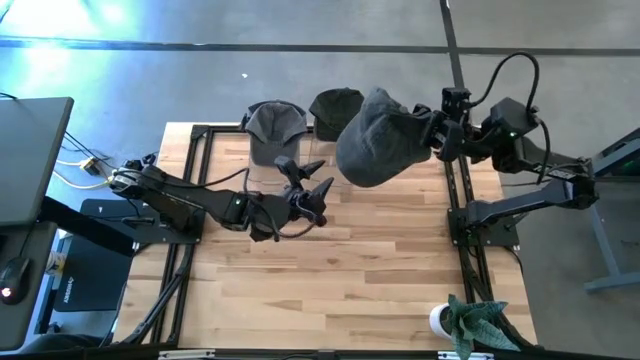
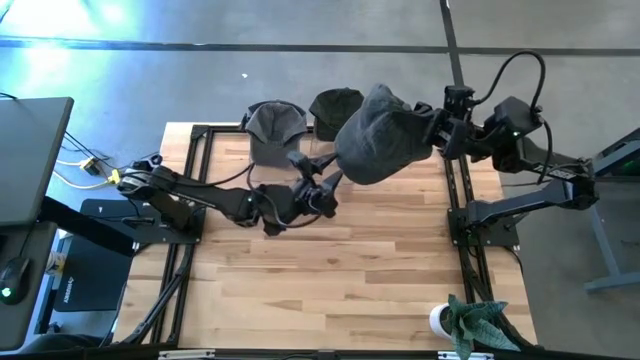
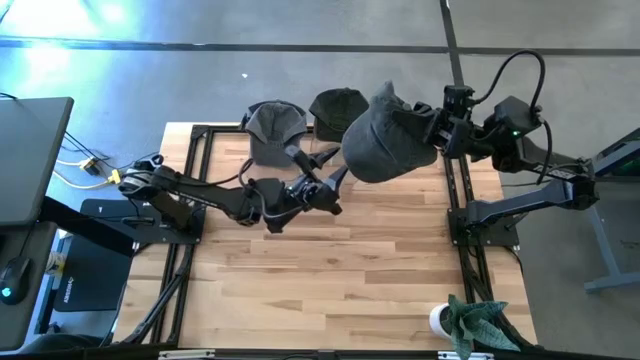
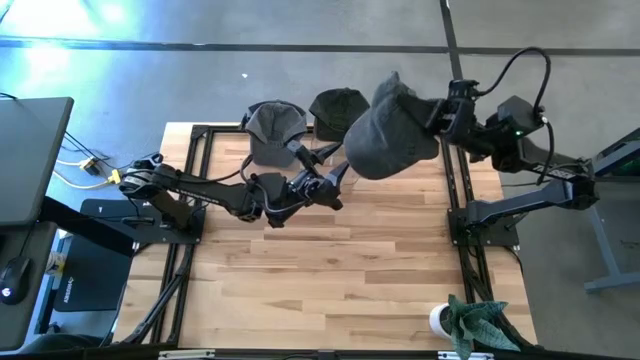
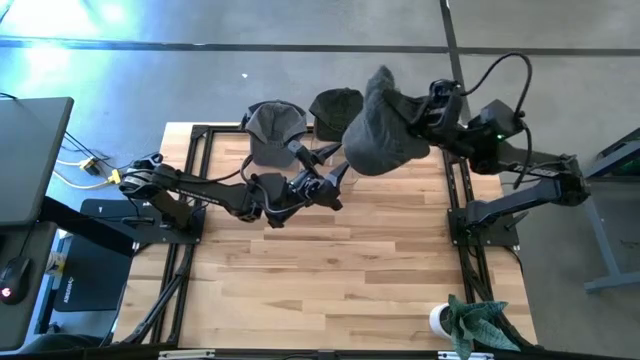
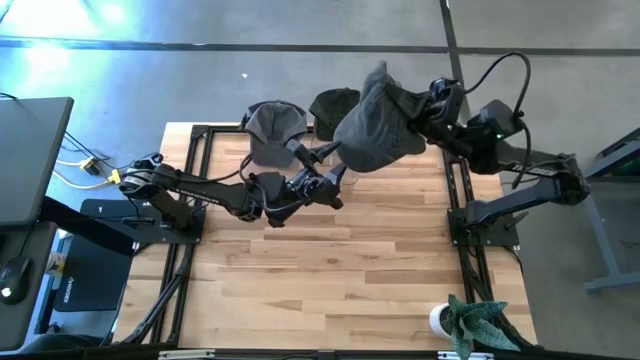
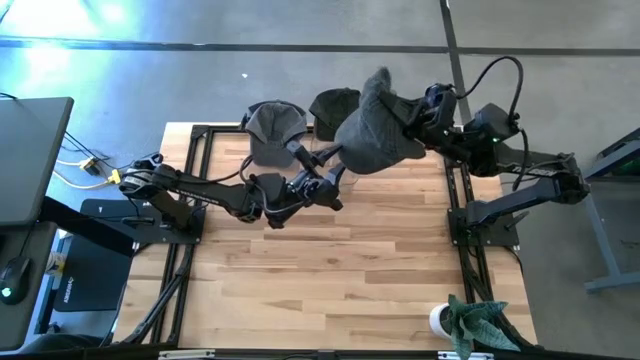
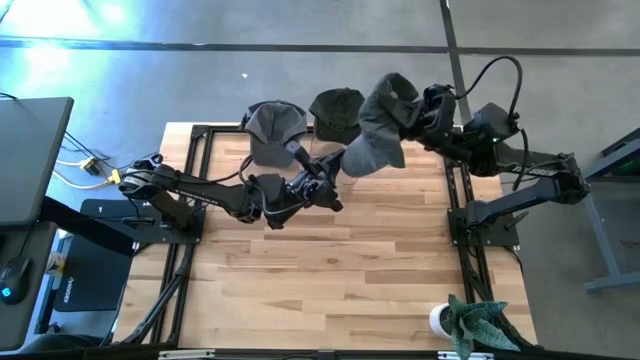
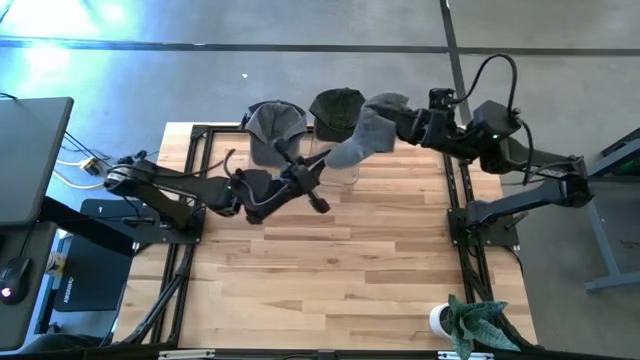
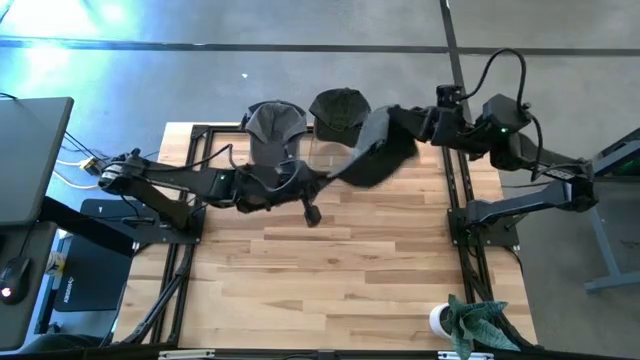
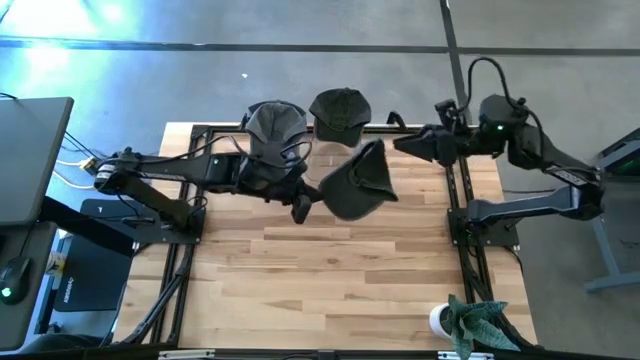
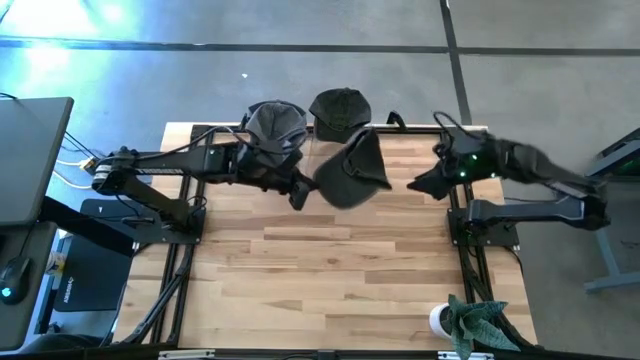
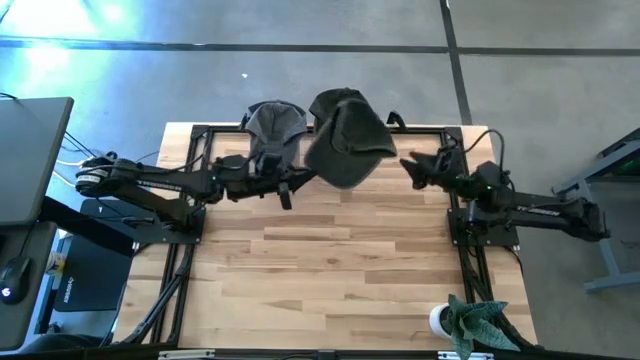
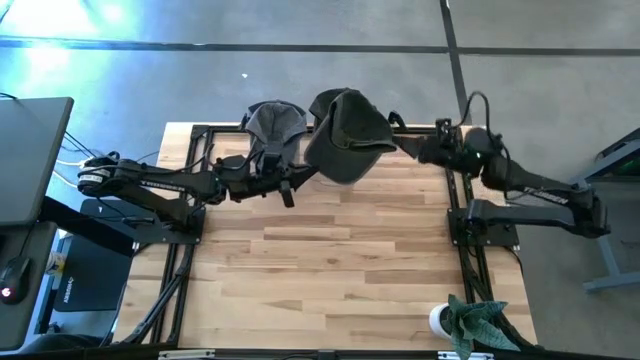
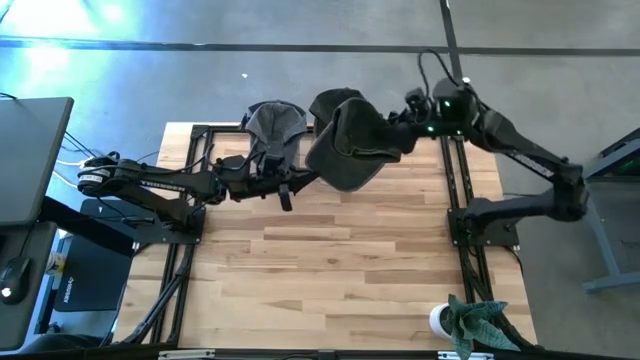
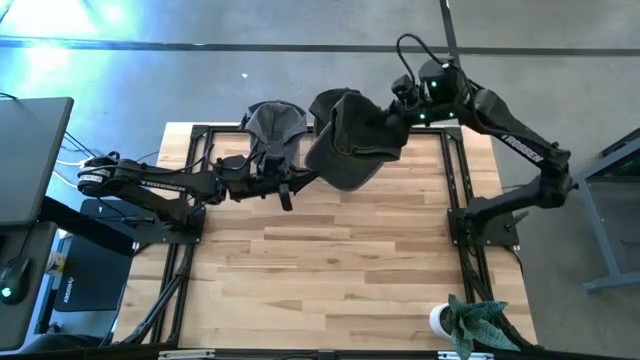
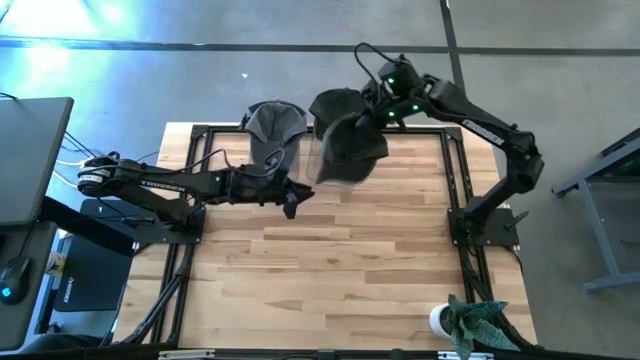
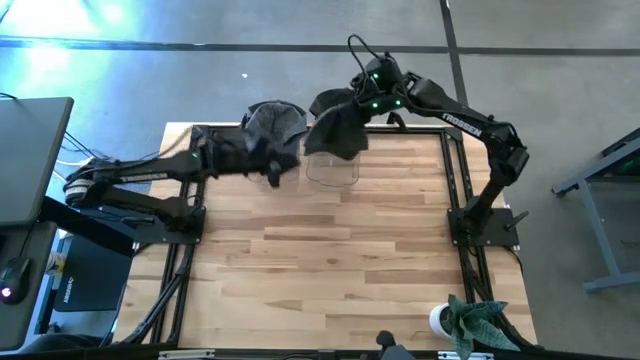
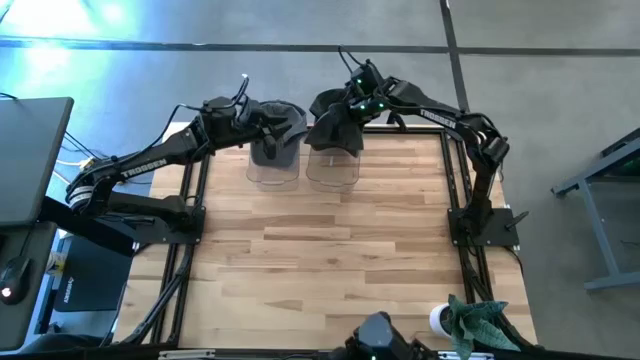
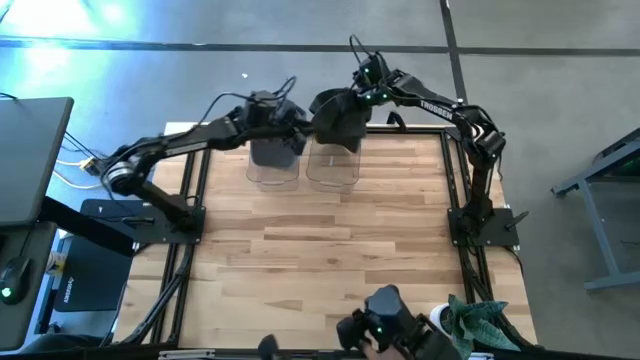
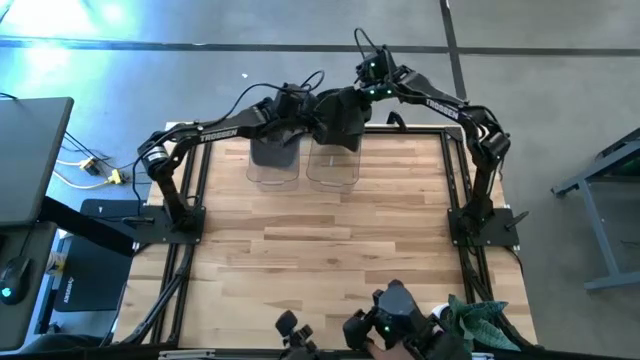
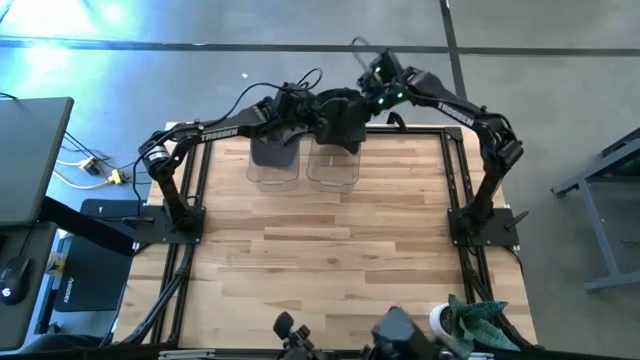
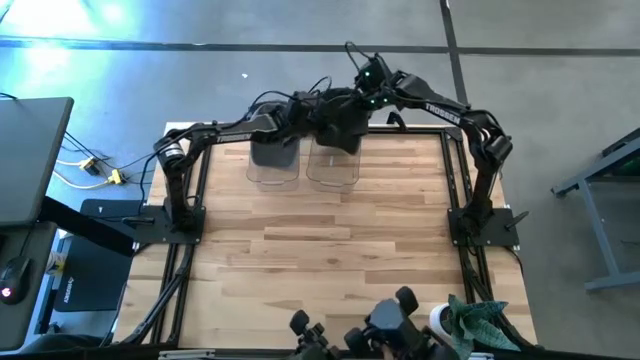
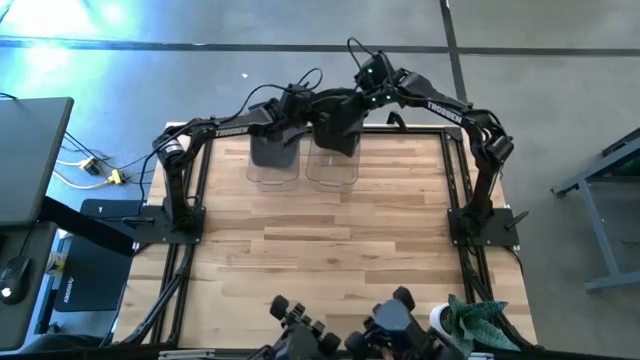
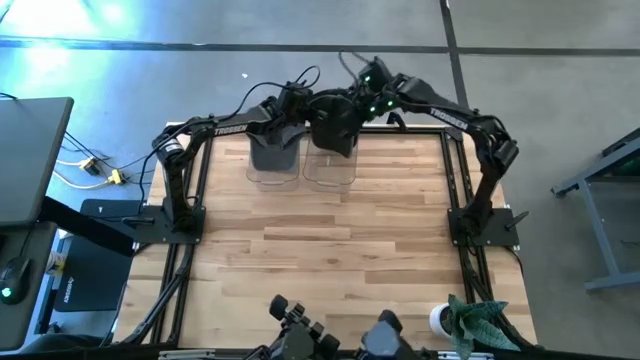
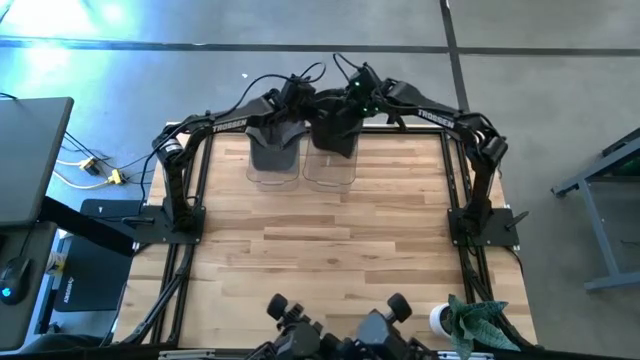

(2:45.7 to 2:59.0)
Task: Pick & Place hat
Put the black cap into the right transparent bin

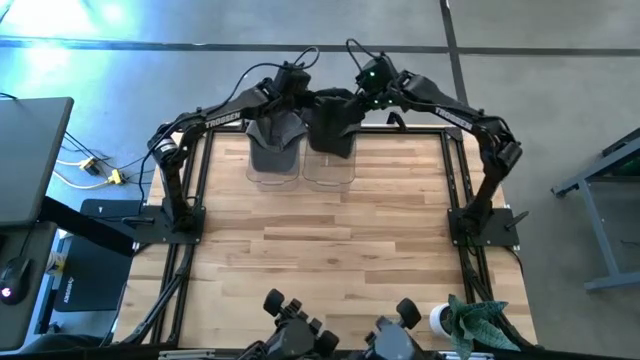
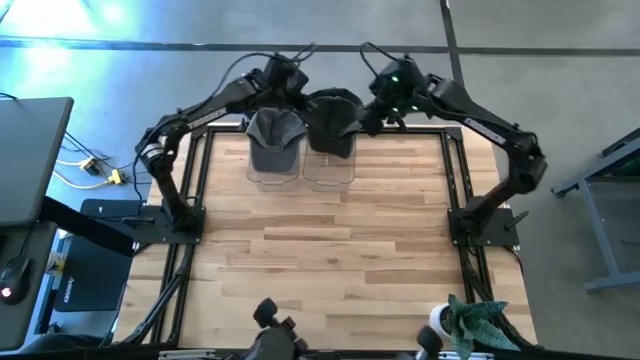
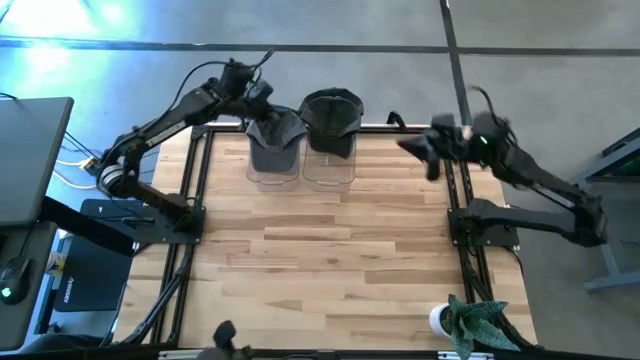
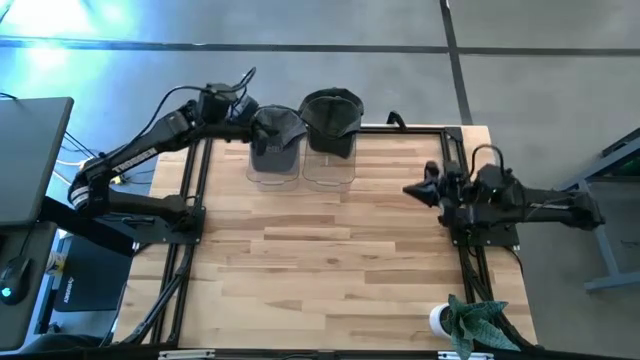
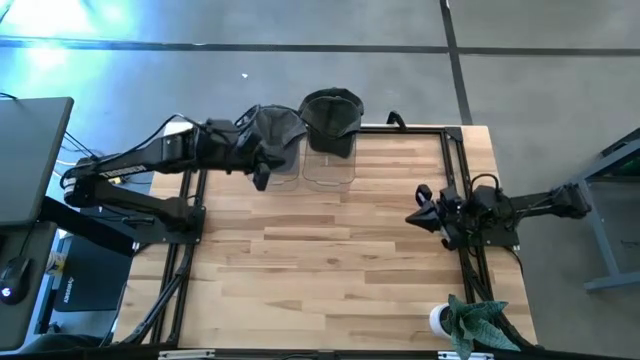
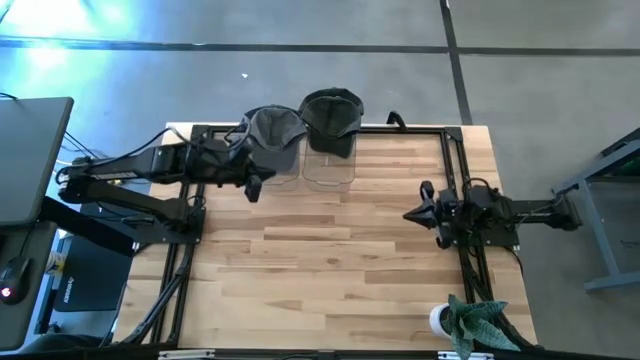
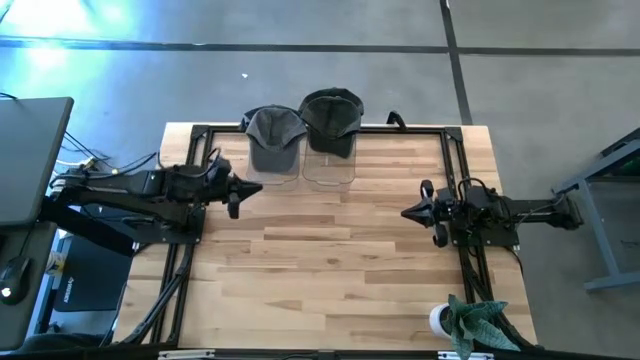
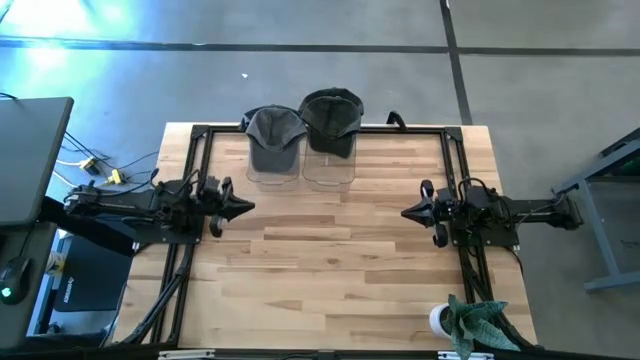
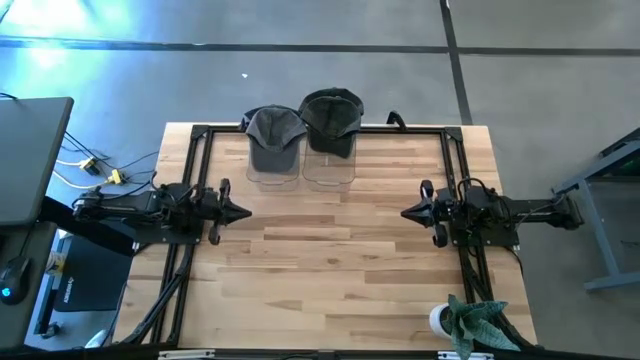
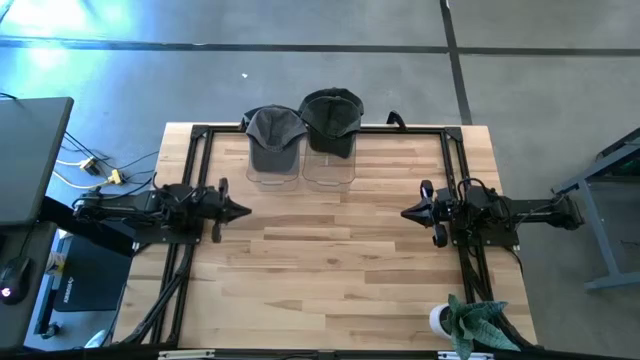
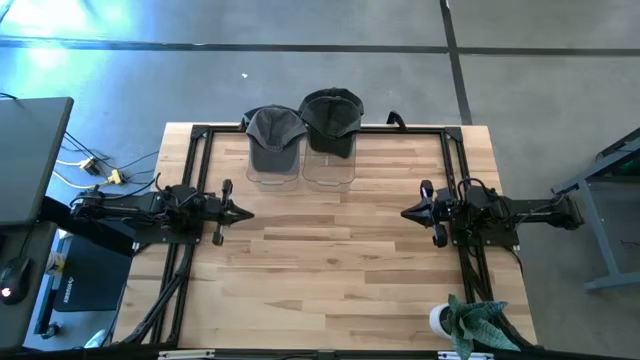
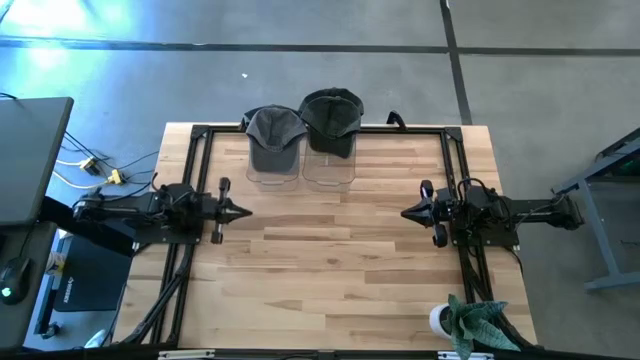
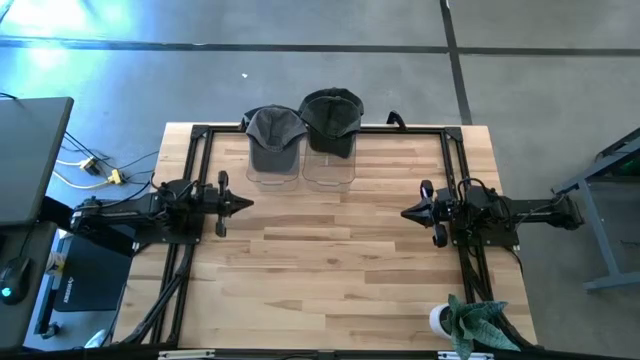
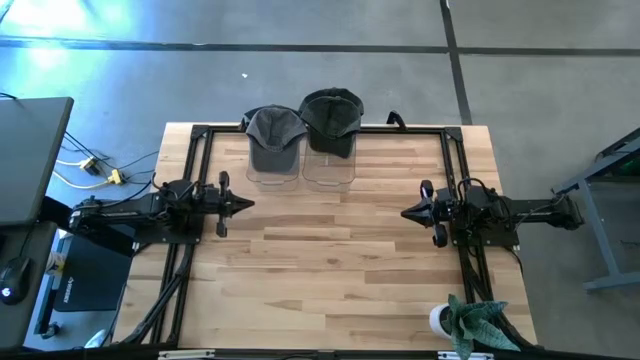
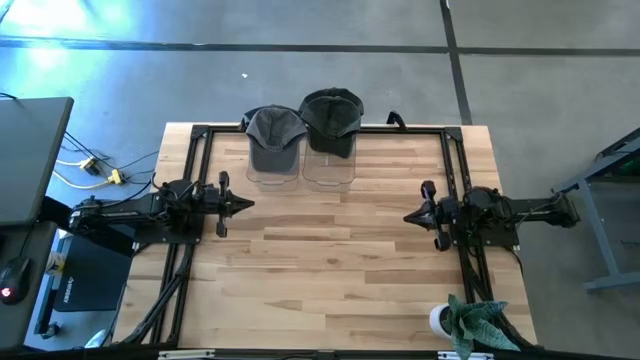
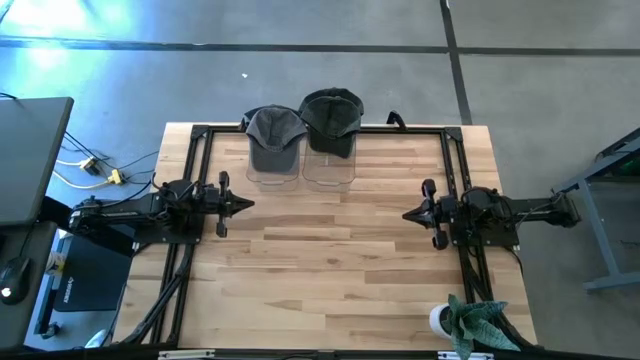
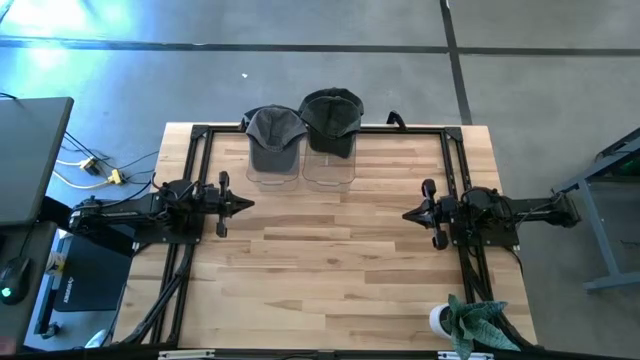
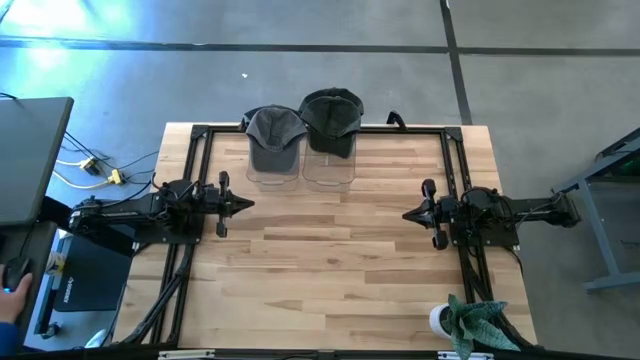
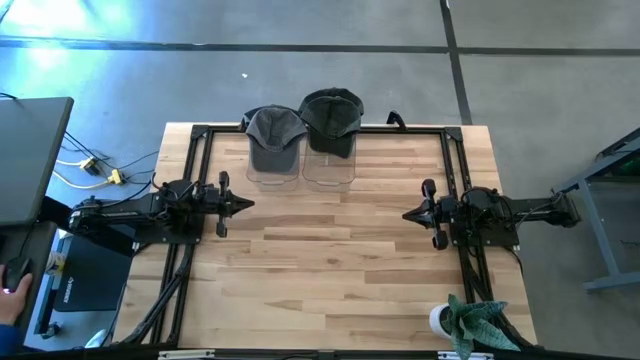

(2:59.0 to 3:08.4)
Return to Home Position
